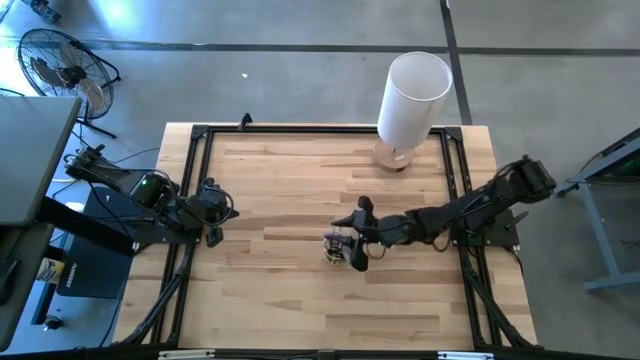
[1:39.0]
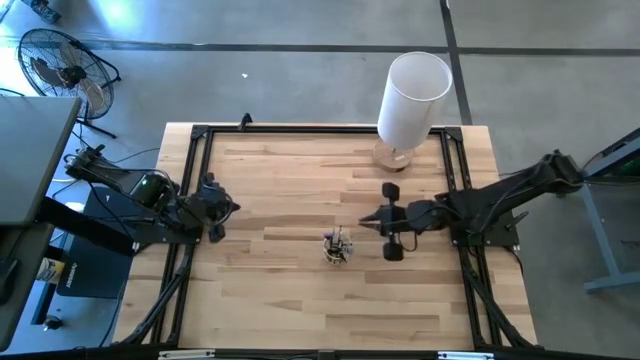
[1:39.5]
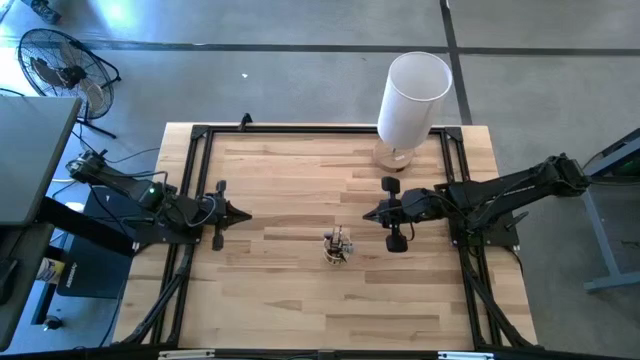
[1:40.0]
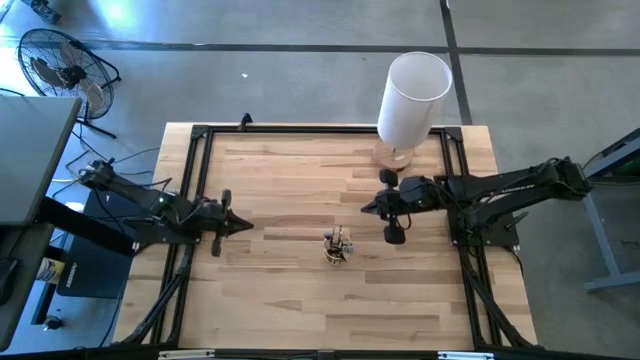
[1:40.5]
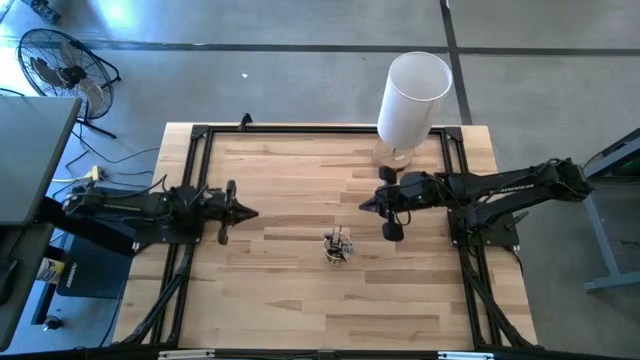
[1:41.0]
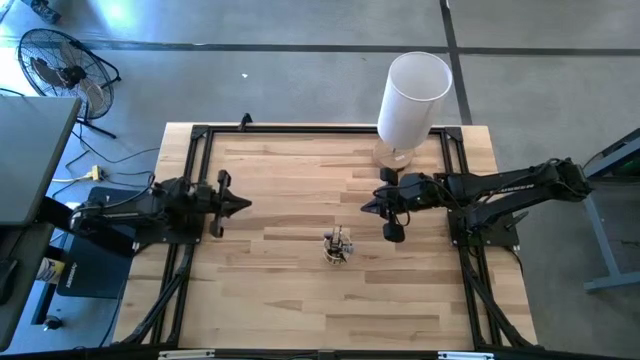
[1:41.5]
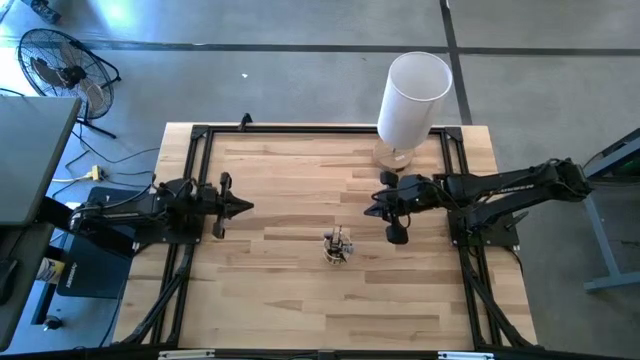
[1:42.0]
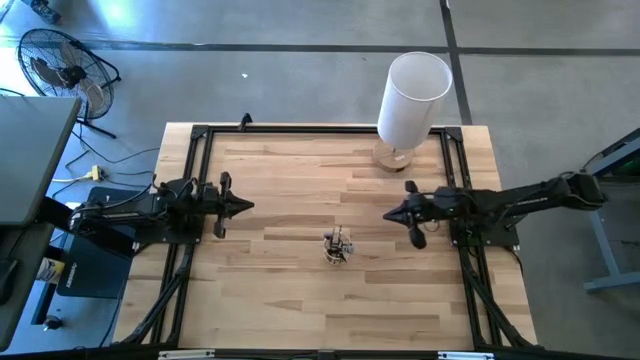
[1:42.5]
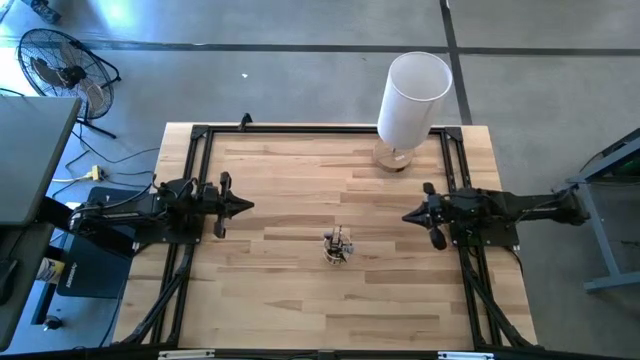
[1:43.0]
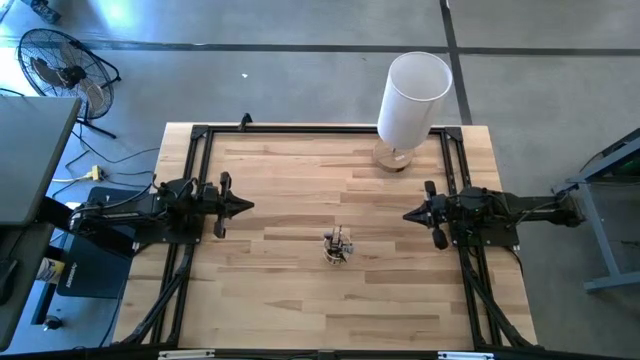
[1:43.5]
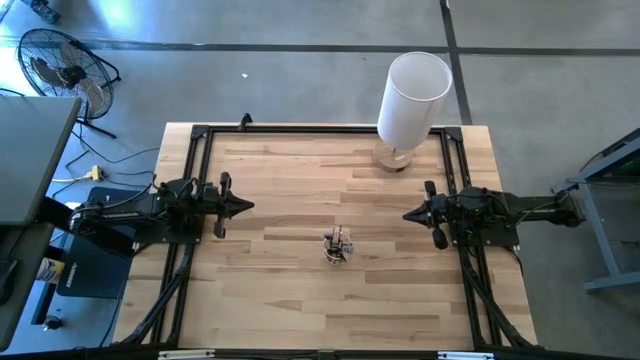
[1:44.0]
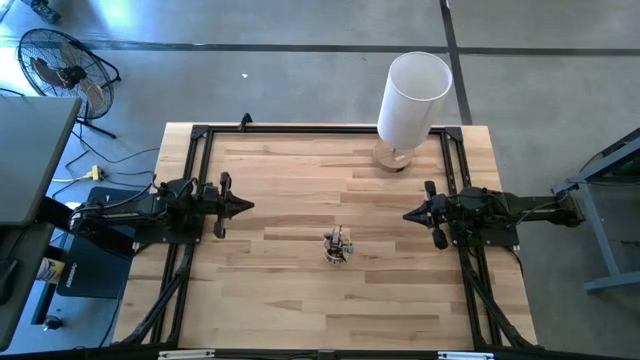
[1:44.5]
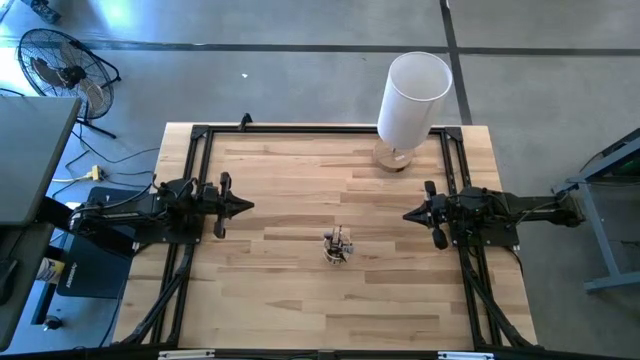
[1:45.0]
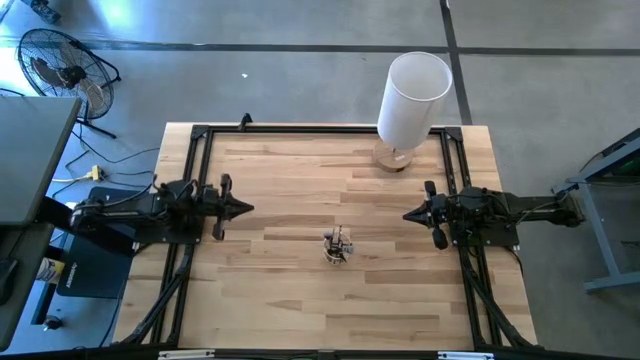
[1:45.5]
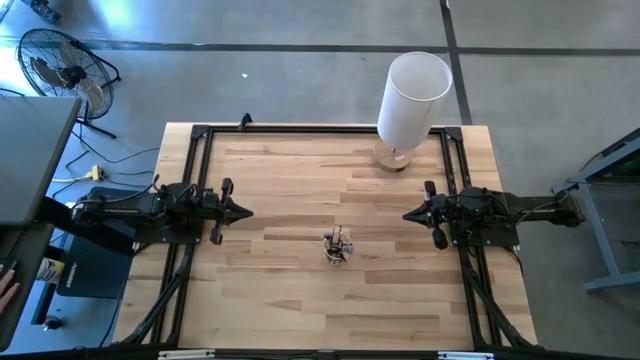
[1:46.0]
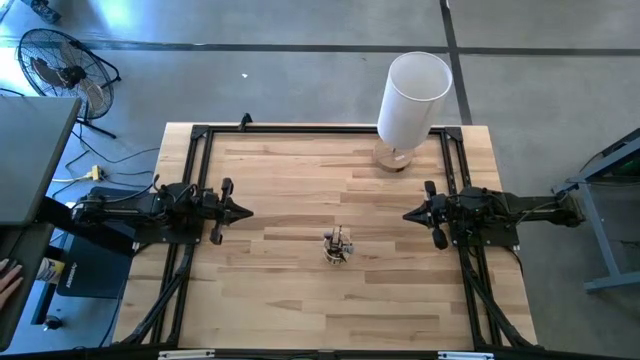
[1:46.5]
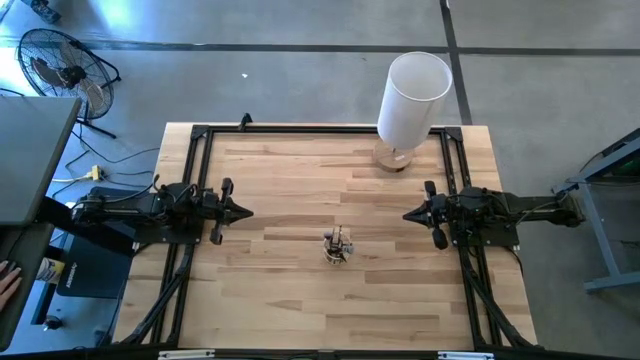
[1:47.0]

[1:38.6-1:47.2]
Task: Put items in baskets/containers
Return to Home Position

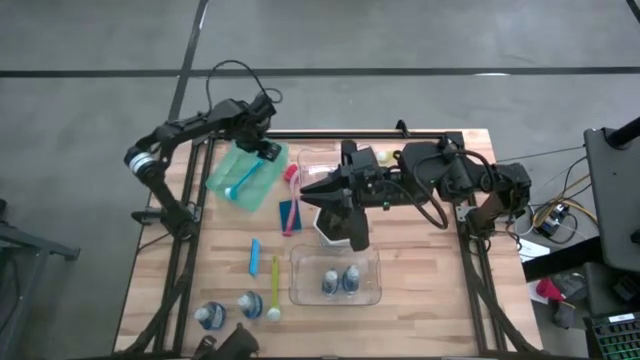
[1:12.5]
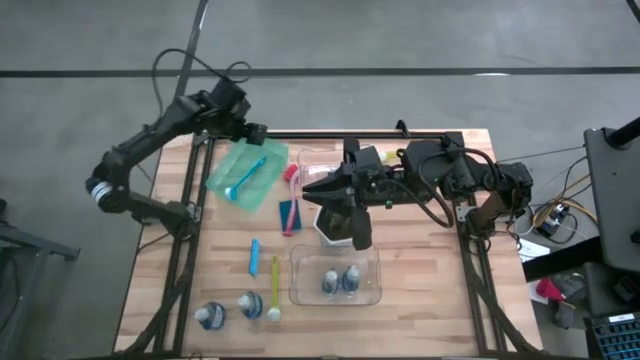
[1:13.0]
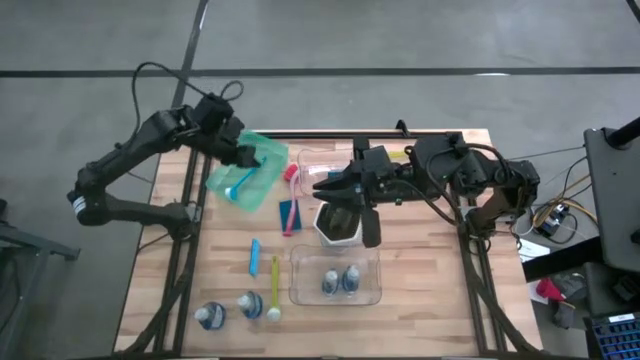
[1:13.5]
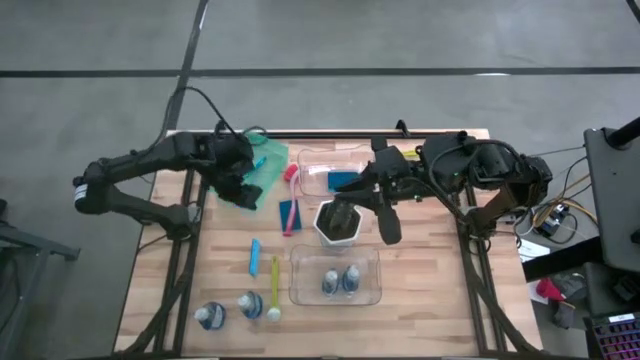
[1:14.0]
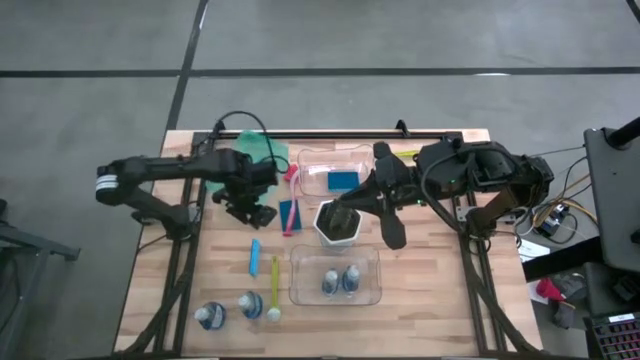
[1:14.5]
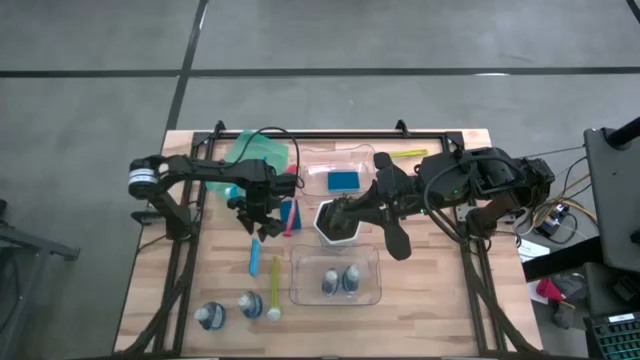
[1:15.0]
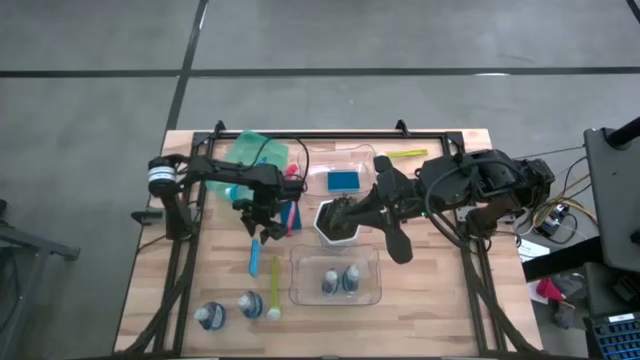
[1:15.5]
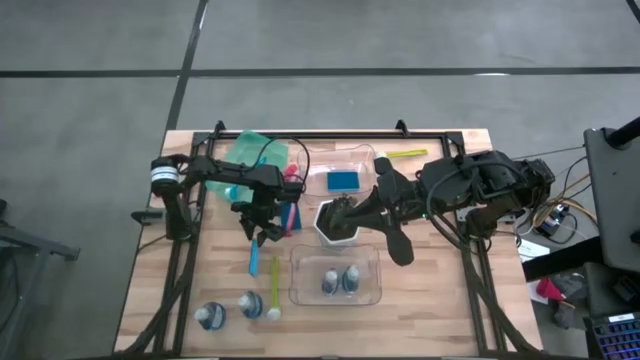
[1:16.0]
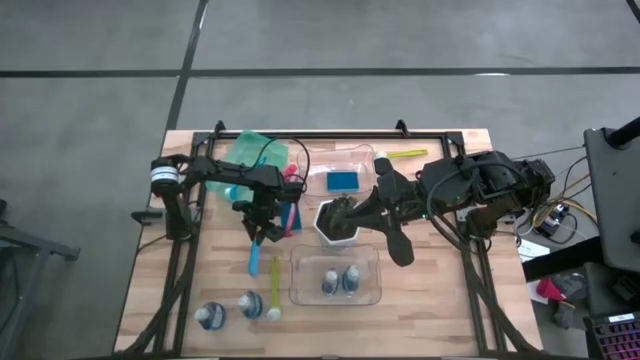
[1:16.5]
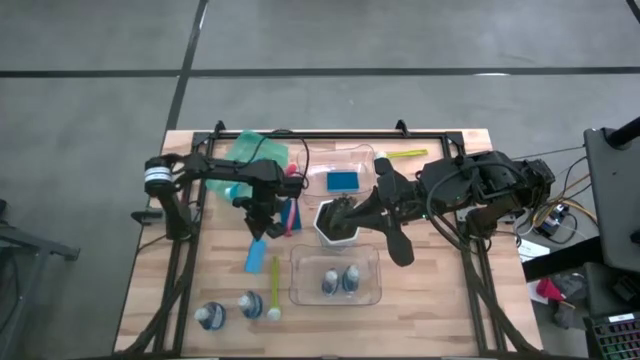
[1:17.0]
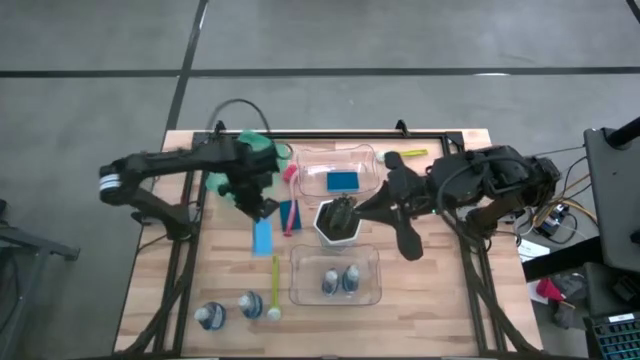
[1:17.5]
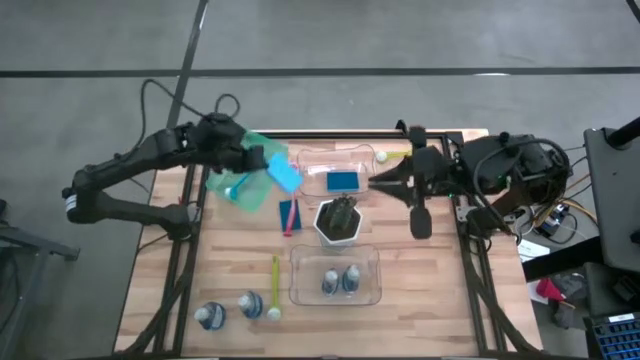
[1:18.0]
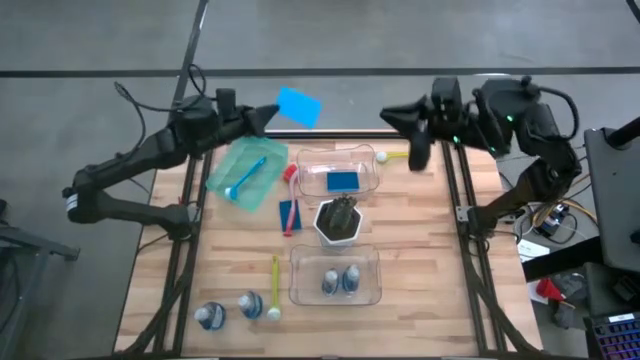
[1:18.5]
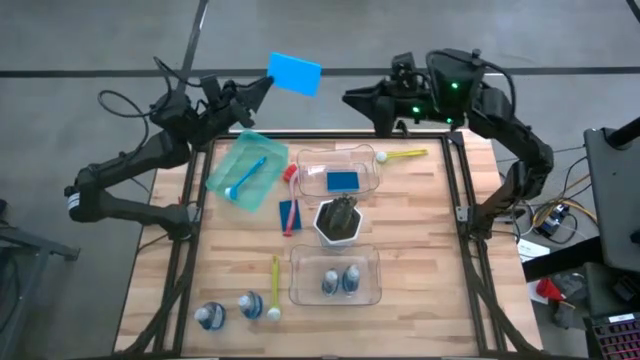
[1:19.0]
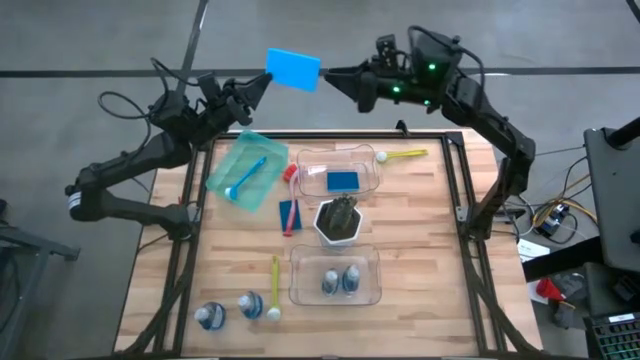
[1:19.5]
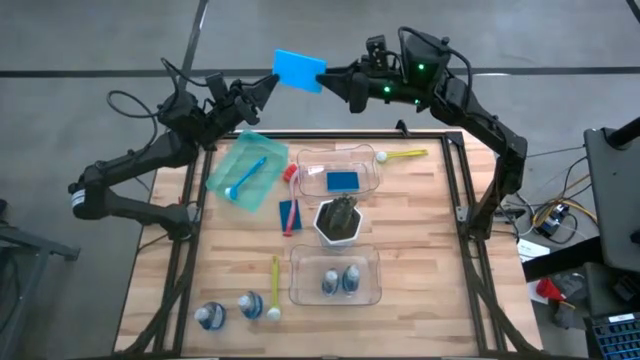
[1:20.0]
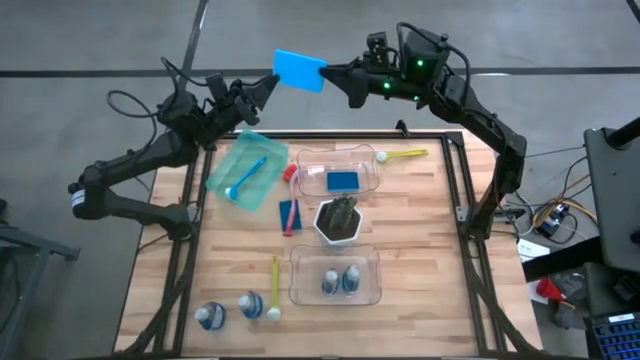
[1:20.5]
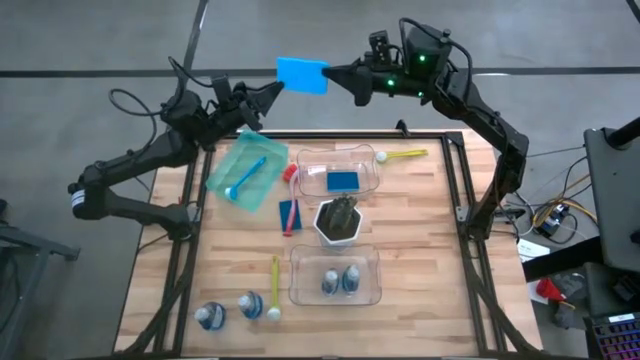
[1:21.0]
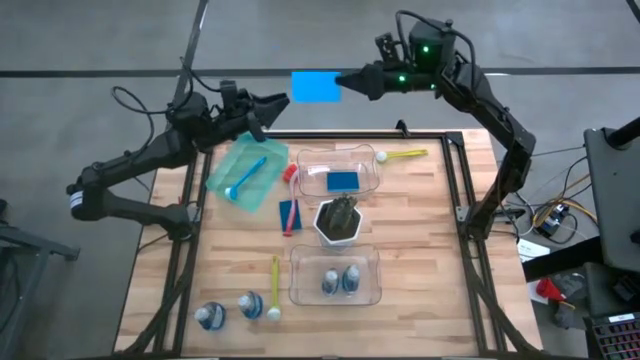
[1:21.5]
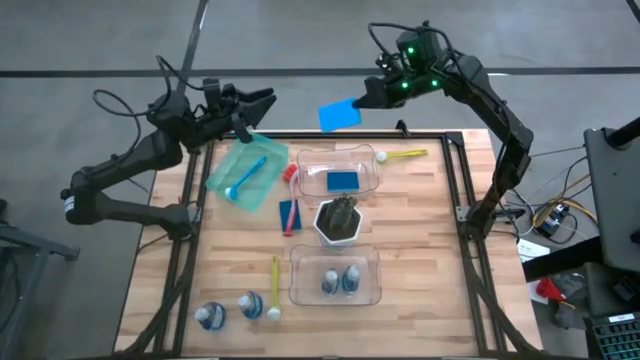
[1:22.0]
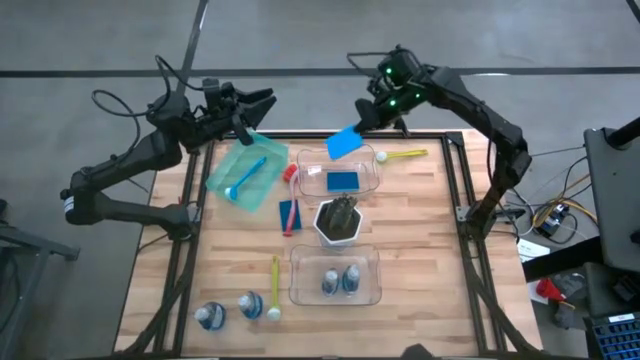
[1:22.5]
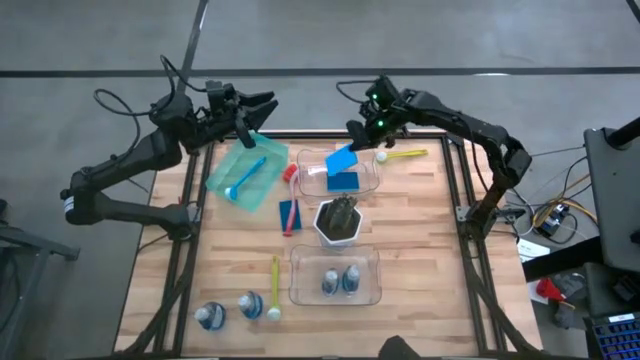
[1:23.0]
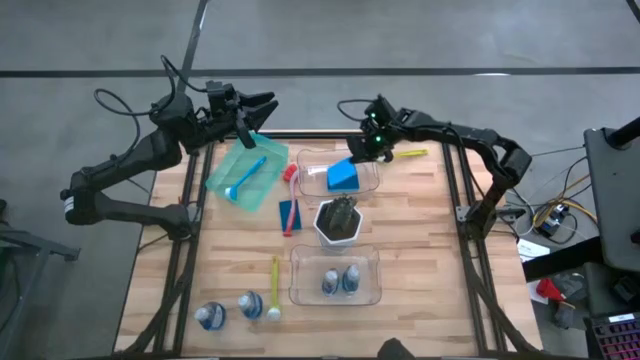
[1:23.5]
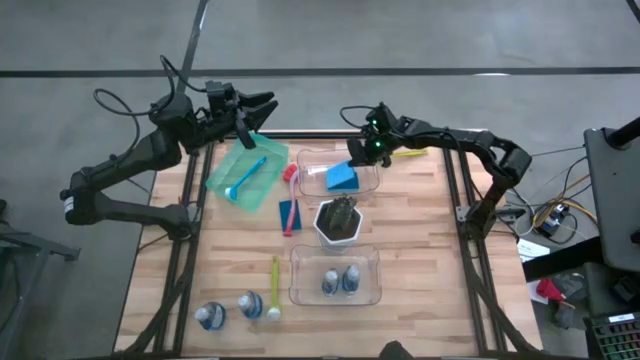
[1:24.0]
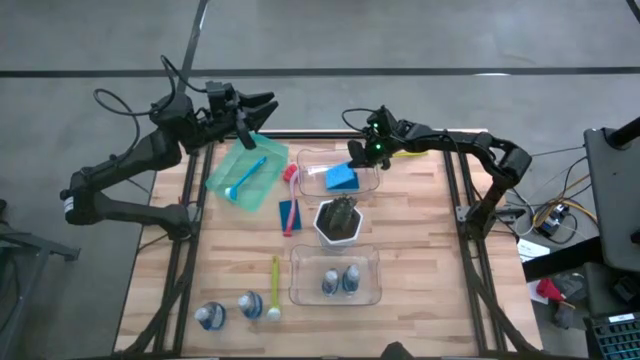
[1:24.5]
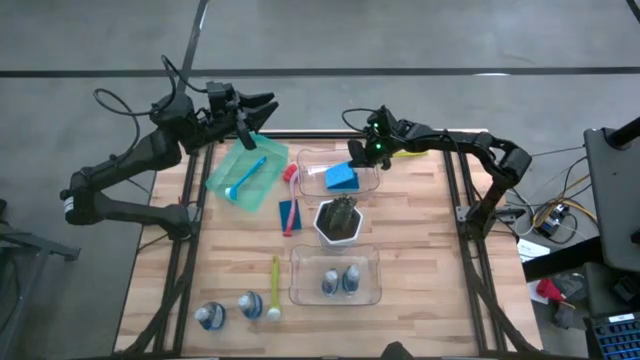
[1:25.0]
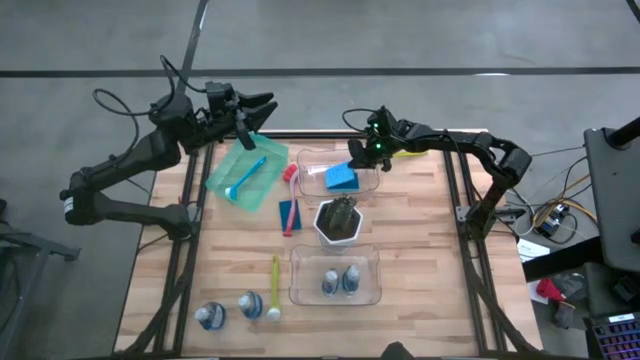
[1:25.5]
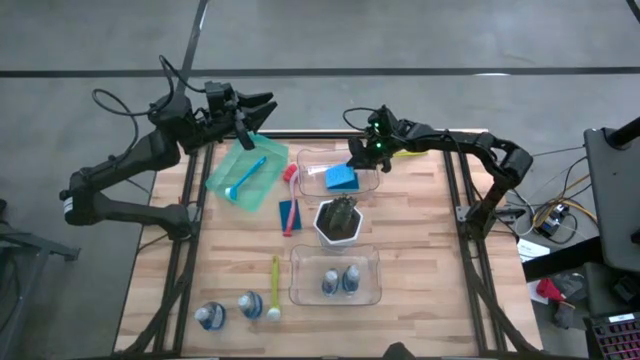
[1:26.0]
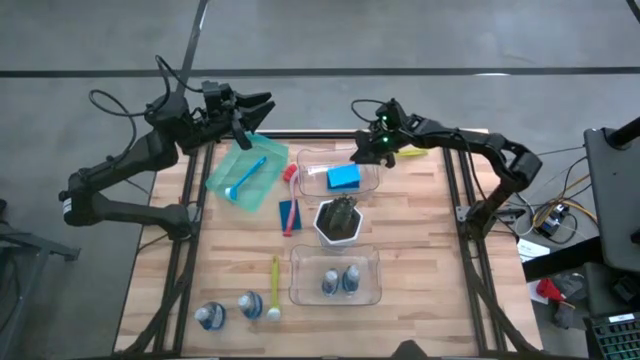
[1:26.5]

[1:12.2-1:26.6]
Task: Pick & Place Kitchen Sink Supplies
Put the blue sponge wipe into the top transparent bin
